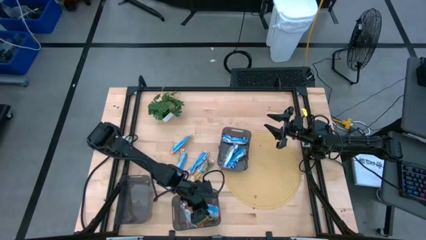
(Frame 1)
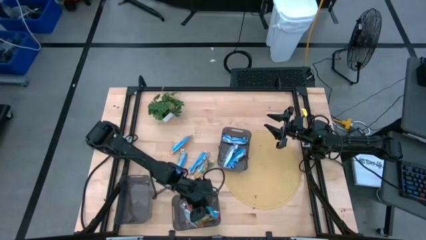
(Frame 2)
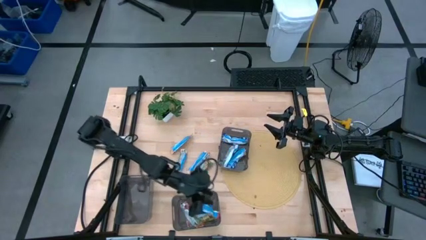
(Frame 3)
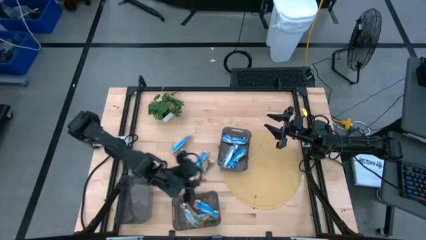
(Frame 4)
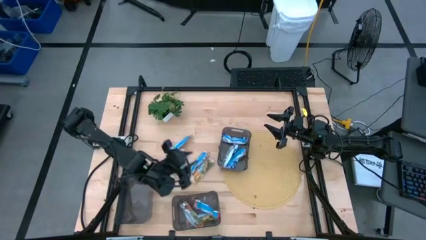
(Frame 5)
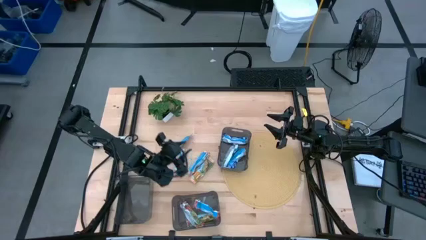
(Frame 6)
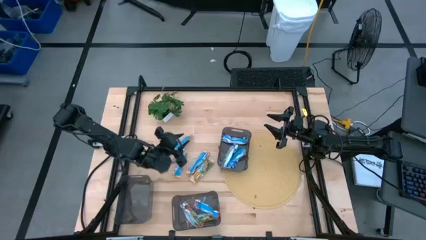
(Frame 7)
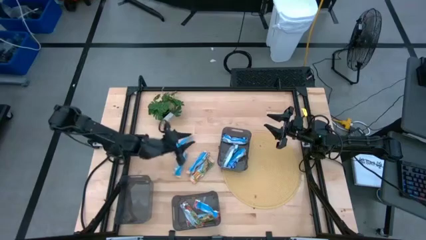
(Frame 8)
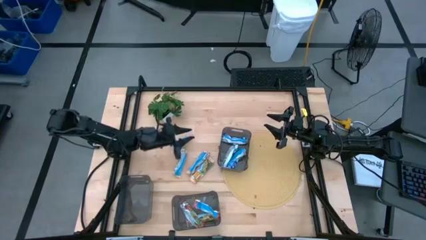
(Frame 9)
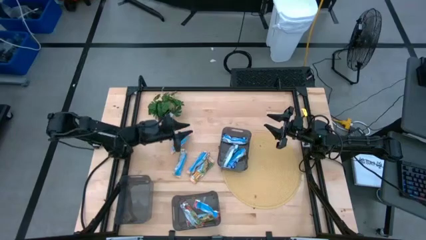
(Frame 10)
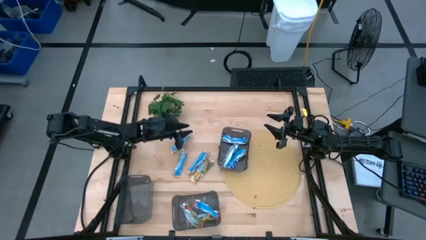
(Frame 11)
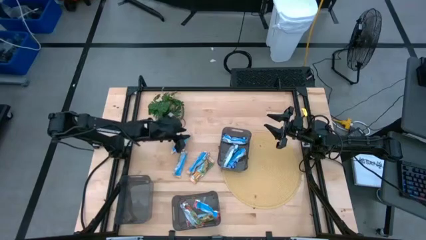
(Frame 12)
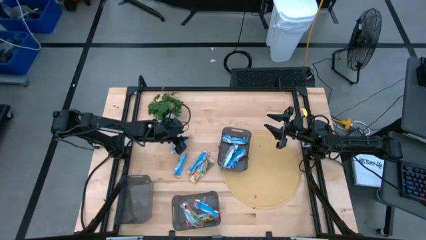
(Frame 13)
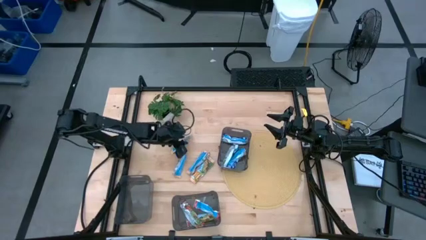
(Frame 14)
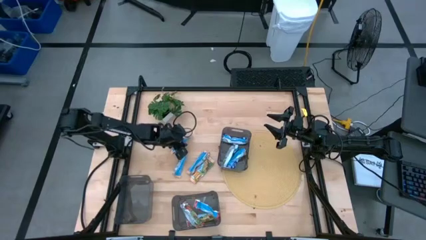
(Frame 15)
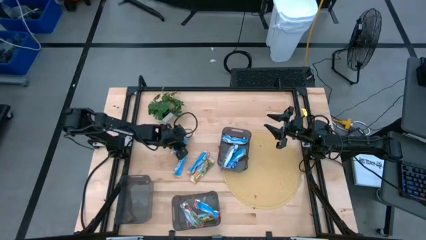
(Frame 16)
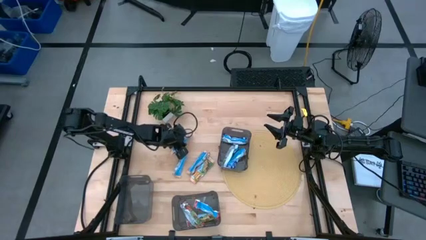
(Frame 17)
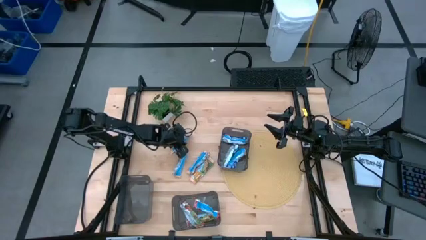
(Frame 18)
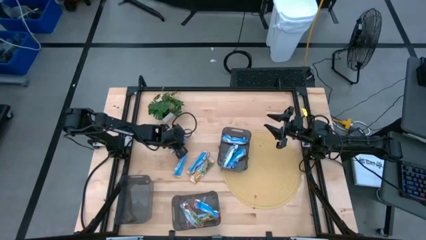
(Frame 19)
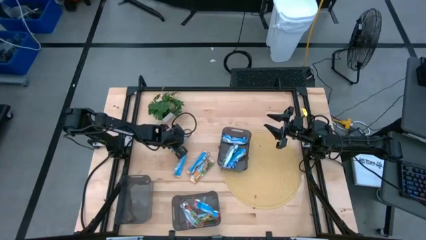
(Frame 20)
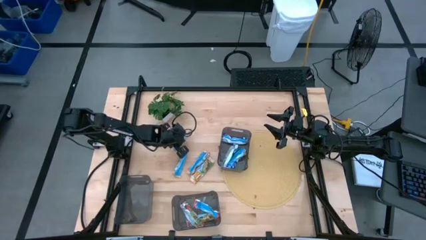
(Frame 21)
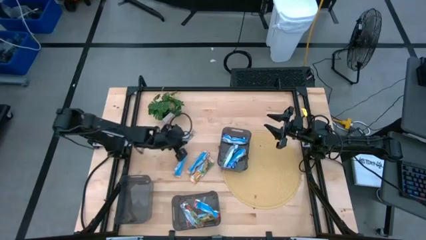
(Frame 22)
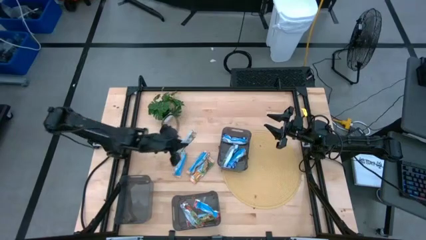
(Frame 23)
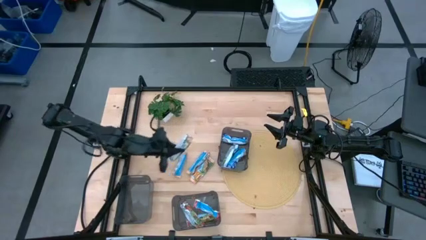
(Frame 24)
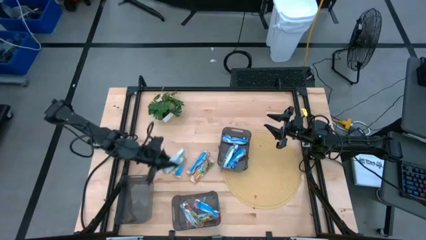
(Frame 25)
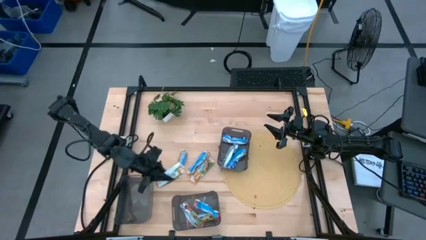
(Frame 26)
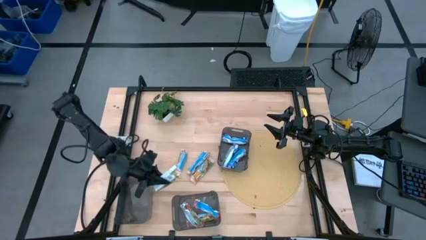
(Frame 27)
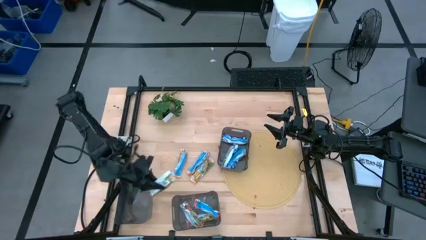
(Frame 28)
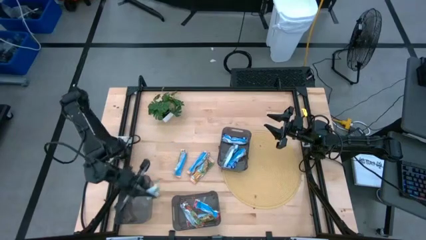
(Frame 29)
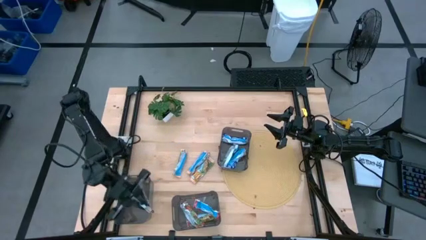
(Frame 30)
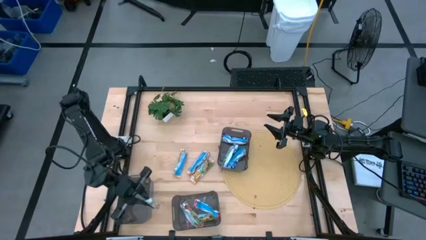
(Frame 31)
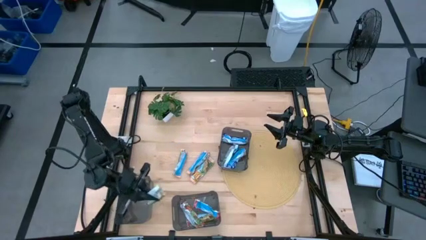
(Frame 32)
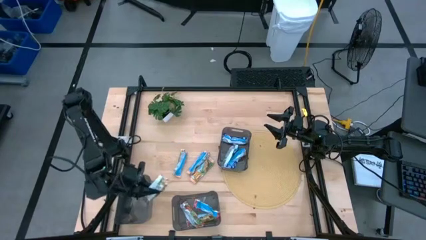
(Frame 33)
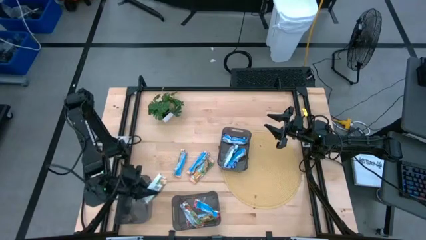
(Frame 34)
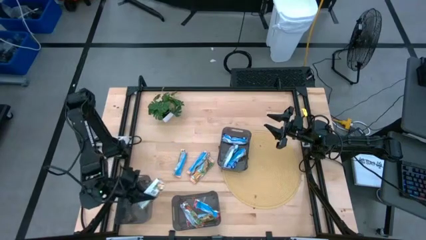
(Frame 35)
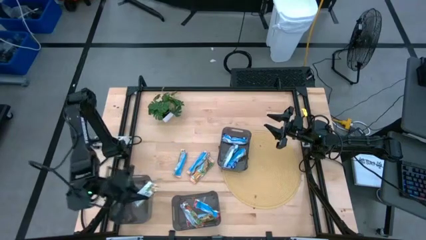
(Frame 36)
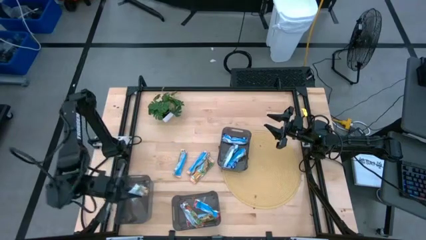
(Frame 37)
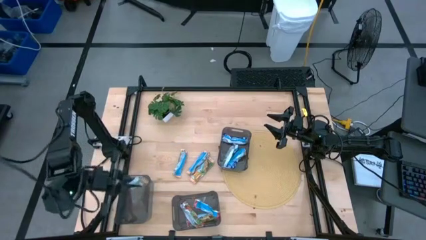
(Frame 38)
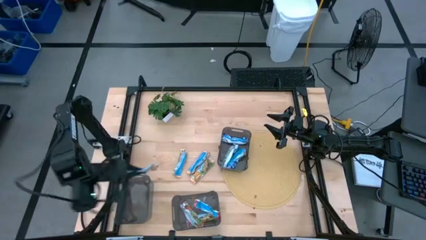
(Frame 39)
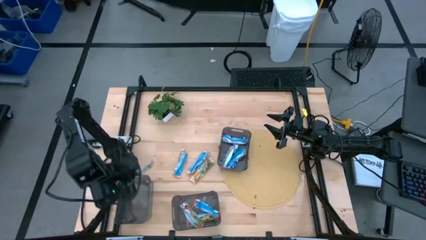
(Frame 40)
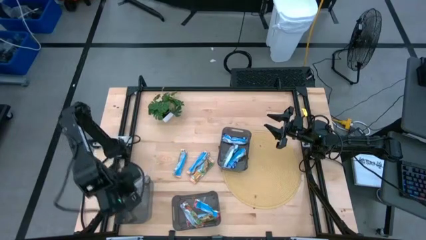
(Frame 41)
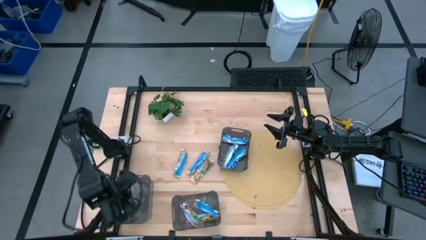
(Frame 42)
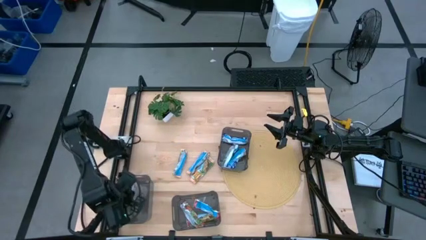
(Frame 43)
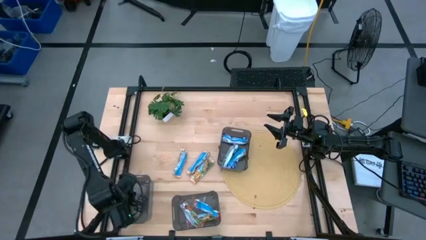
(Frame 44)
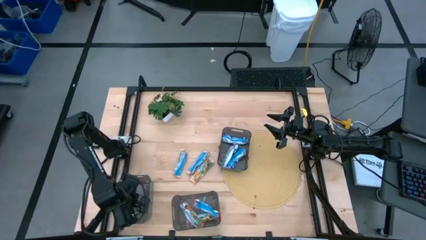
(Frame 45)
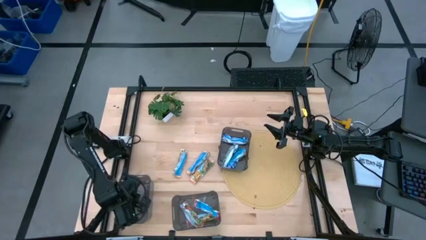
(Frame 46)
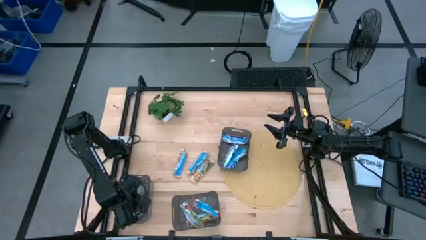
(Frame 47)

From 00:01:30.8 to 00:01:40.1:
Task: Pick and place Granola Bars by type
Put the yellow granola bar into the bottom left black bin

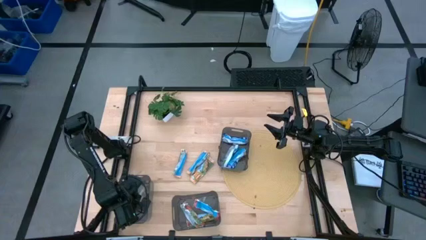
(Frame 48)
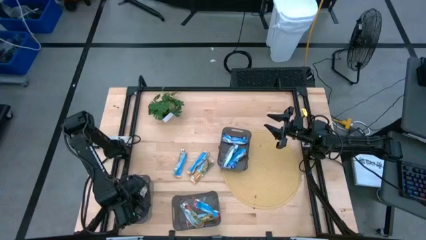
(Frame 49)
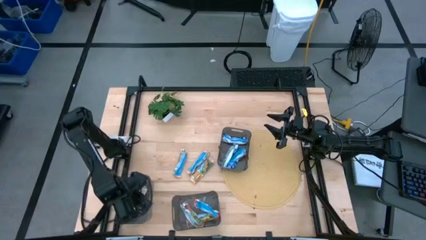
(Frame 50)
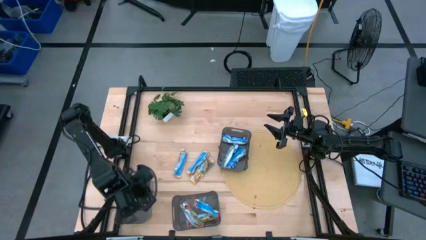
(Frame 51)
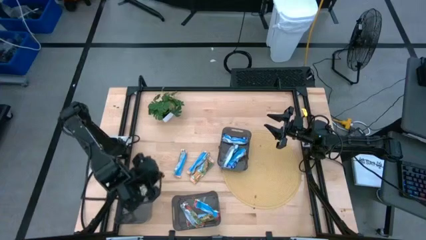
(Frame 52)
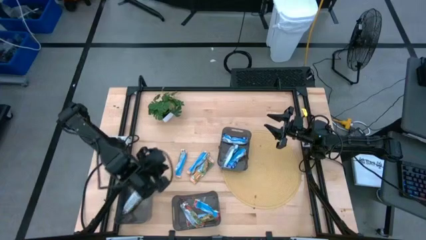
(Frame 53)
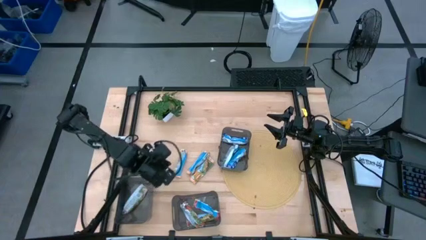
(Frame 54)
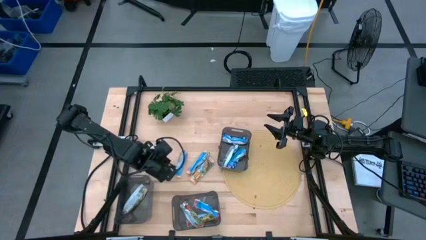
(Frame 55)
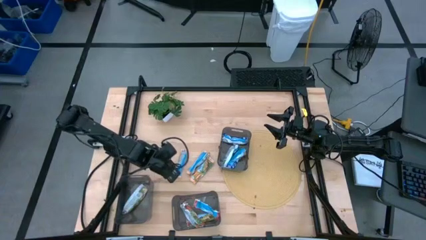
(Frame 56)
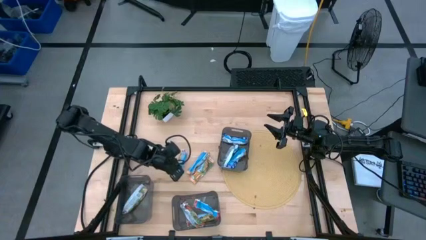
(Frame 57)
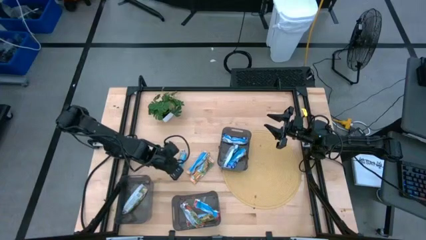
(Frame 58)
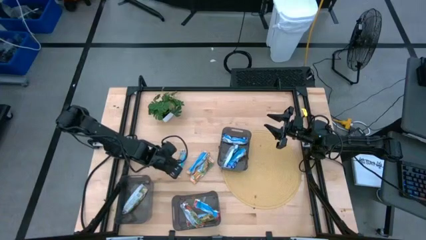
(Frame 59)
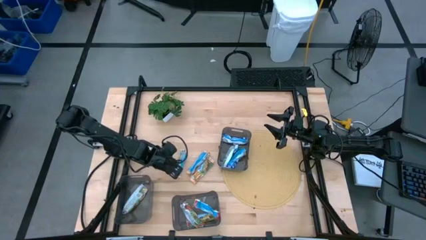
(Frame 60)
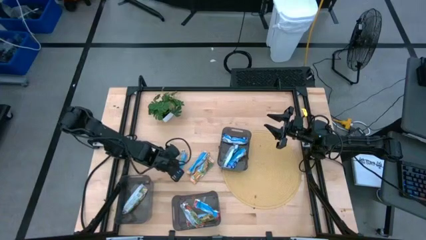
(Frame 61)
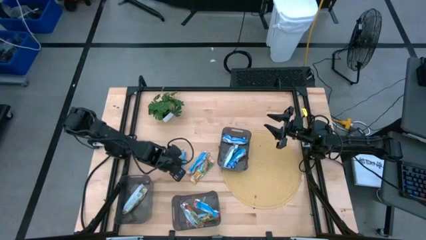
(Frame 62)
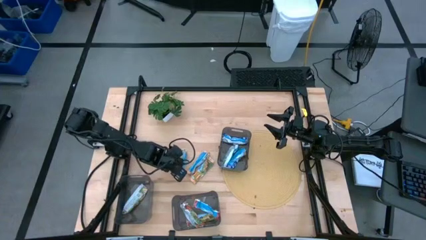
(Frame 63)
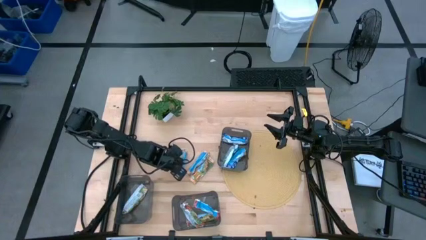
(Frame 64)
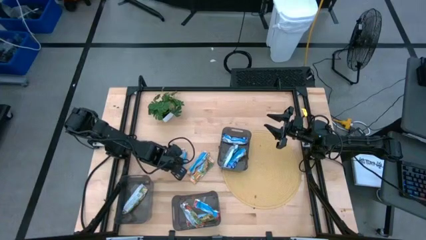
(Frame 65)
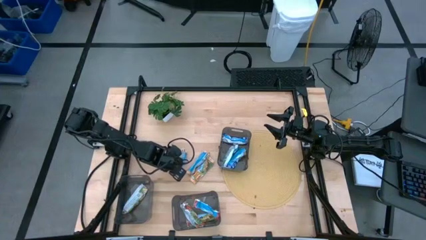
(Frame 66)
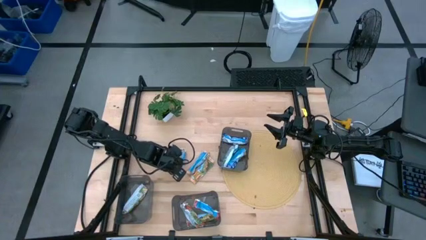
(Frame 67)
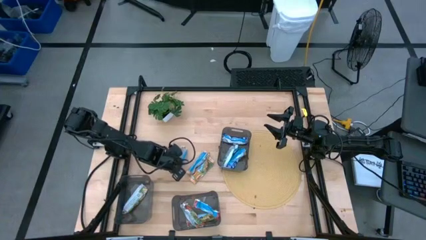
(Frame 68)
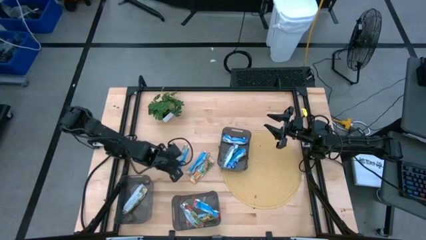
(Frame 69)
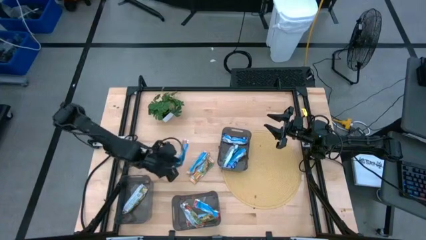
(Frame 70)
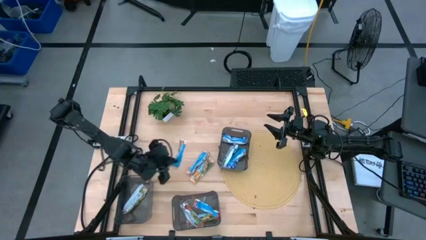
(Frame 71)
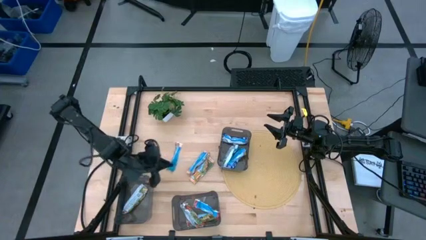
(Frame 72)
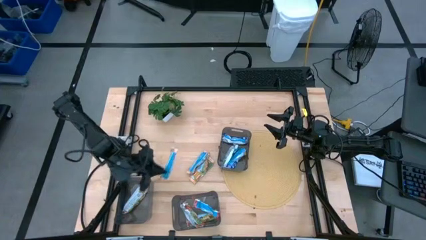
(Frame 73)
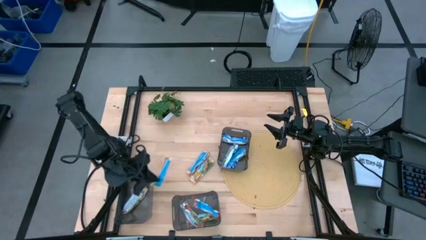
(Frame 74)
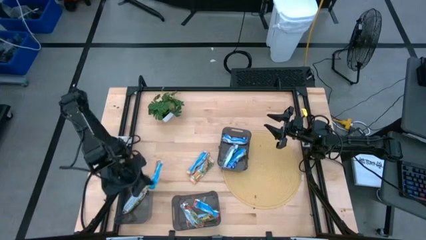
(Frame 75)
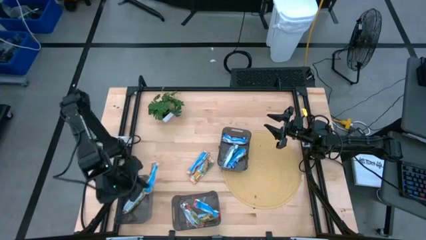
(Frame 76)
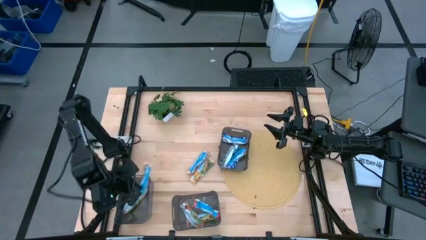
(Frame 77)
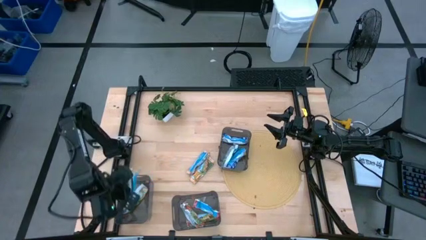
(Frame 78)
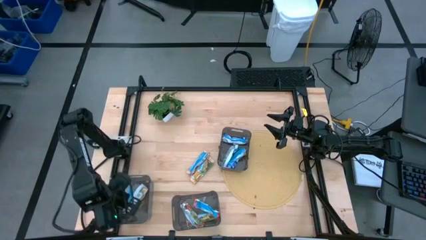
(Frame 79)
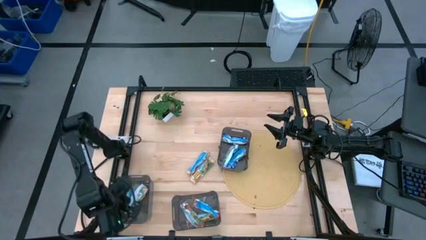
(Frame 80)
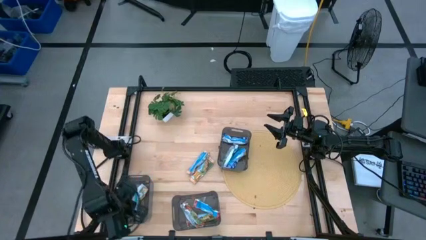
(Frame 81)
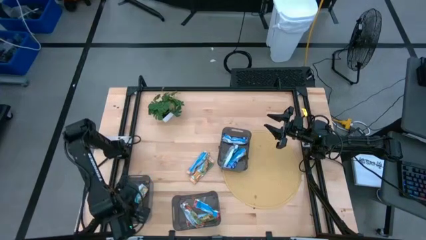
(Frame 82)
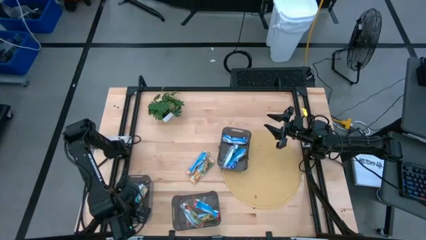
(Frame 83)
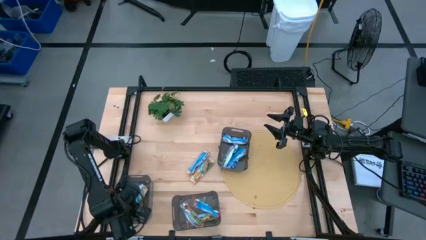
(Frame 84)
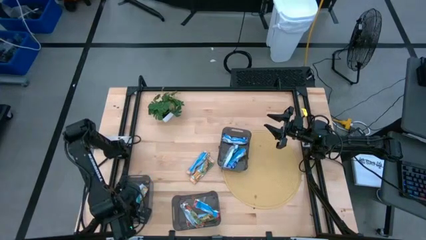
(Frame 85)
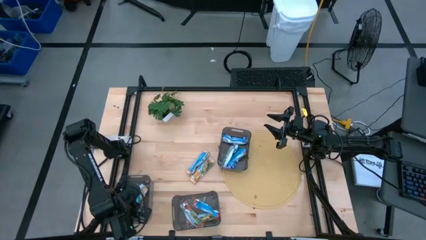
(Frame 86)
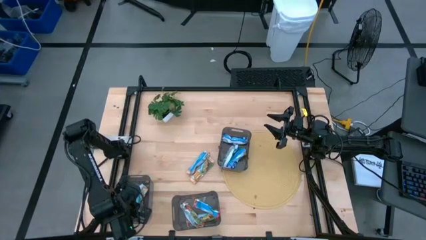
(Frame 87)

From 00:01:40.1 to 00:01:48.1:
Put the left yellow granola bar into the bottom left black bin
